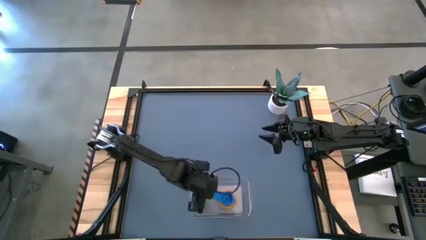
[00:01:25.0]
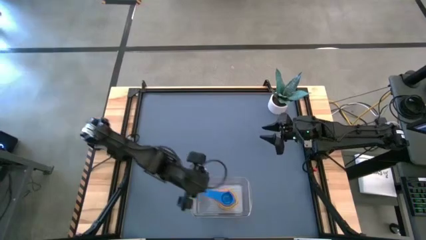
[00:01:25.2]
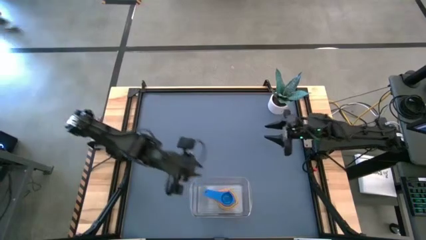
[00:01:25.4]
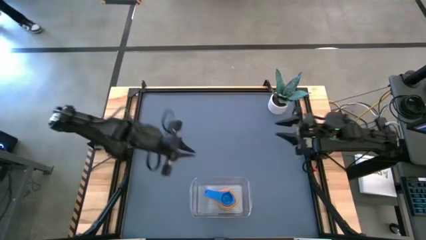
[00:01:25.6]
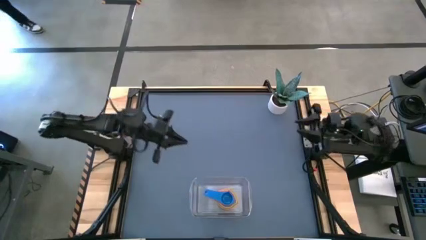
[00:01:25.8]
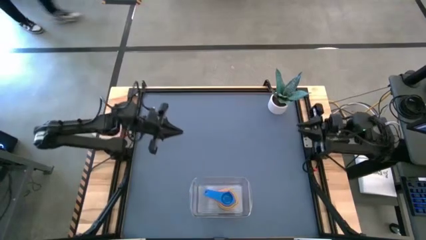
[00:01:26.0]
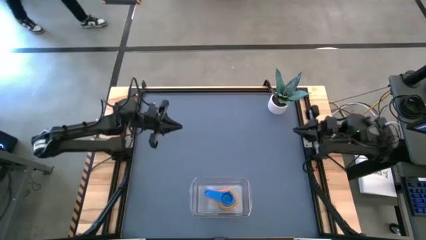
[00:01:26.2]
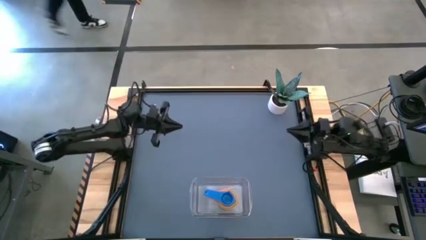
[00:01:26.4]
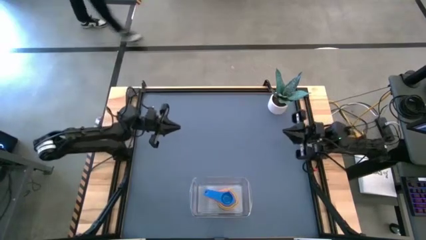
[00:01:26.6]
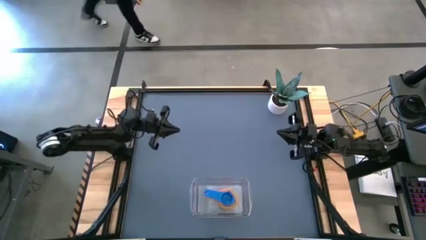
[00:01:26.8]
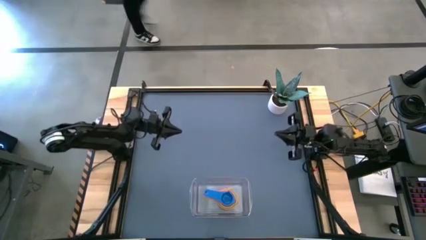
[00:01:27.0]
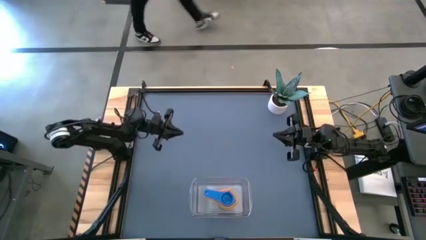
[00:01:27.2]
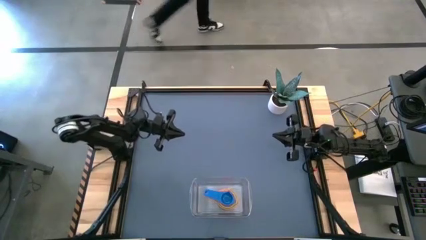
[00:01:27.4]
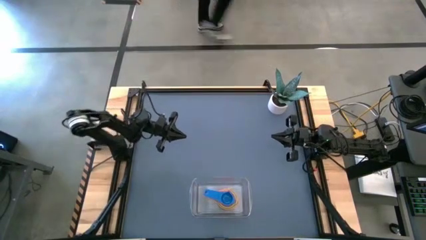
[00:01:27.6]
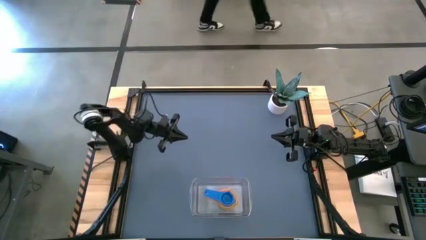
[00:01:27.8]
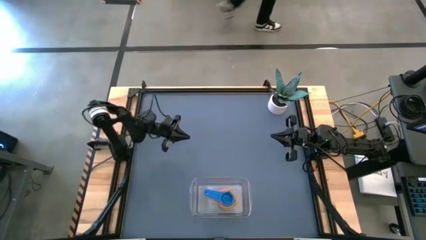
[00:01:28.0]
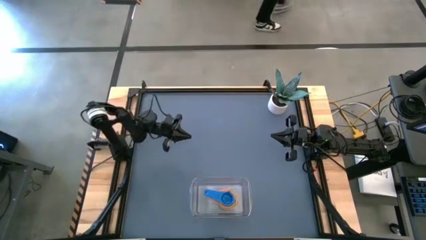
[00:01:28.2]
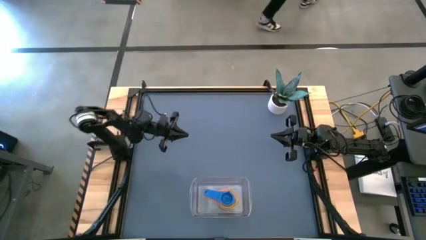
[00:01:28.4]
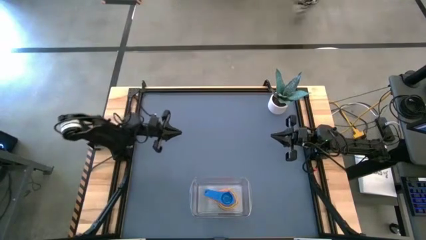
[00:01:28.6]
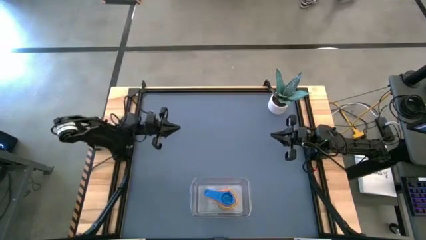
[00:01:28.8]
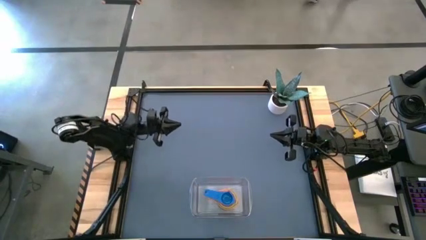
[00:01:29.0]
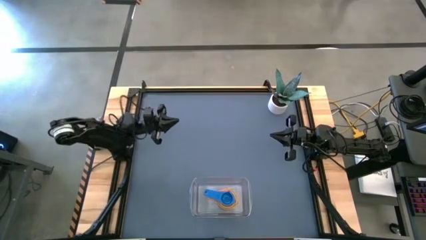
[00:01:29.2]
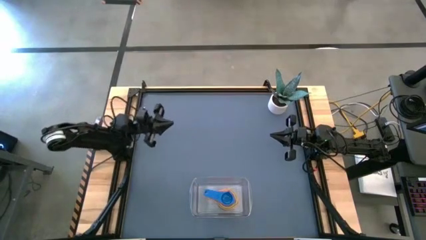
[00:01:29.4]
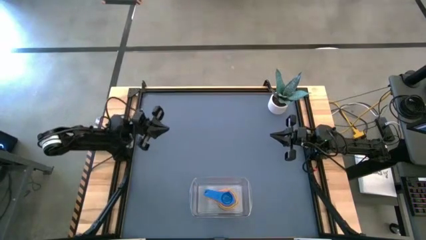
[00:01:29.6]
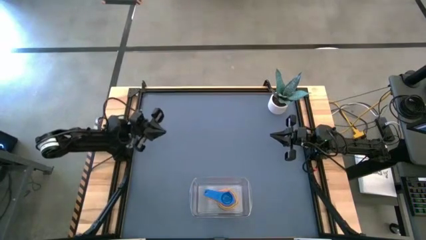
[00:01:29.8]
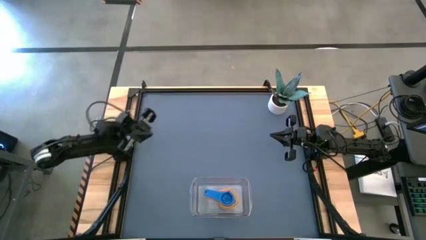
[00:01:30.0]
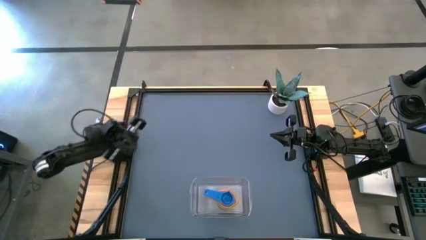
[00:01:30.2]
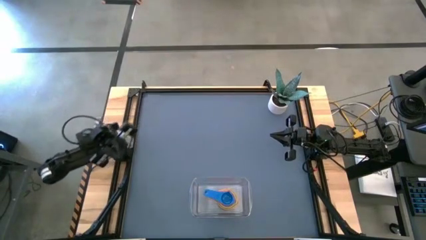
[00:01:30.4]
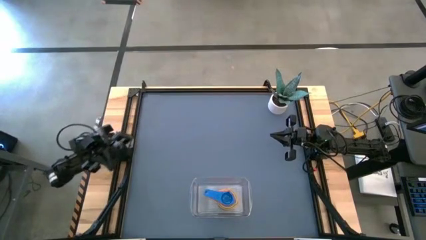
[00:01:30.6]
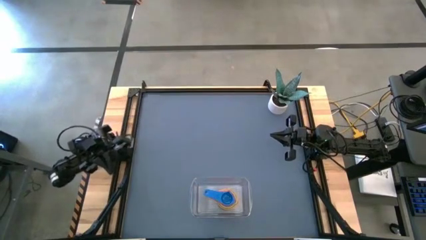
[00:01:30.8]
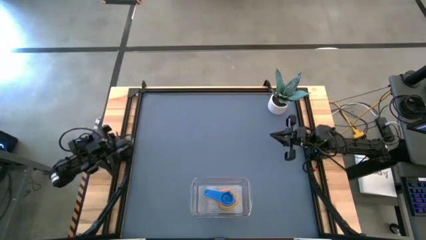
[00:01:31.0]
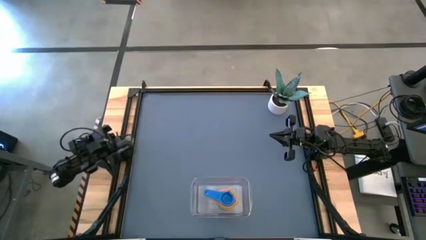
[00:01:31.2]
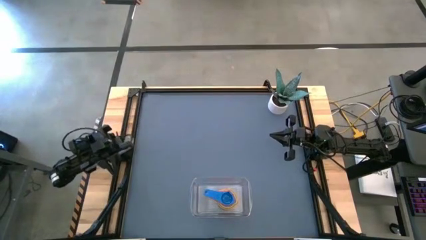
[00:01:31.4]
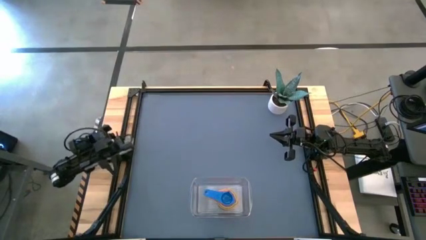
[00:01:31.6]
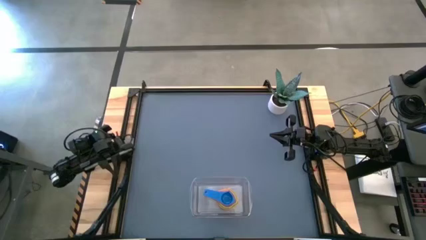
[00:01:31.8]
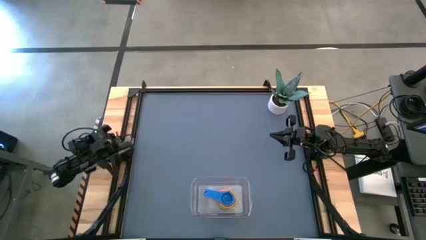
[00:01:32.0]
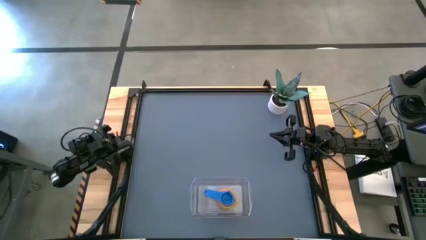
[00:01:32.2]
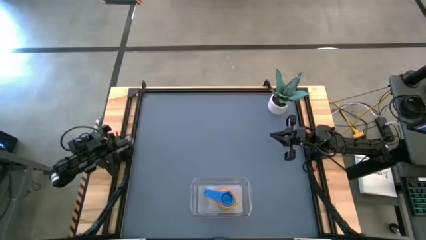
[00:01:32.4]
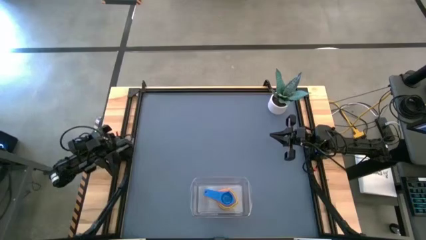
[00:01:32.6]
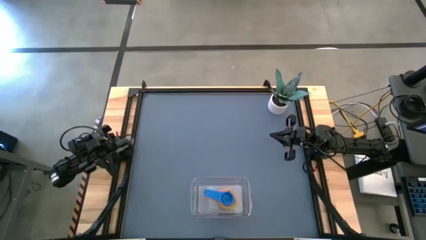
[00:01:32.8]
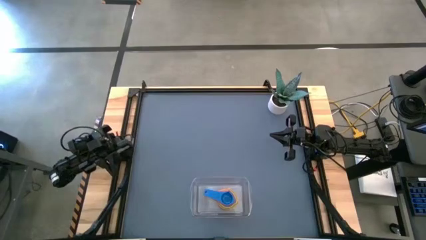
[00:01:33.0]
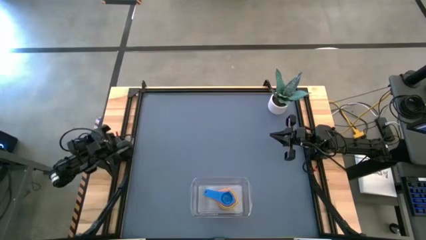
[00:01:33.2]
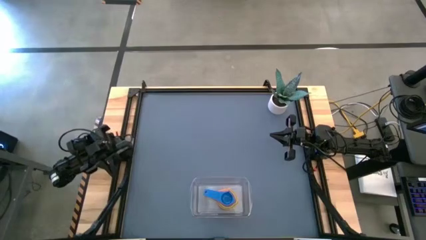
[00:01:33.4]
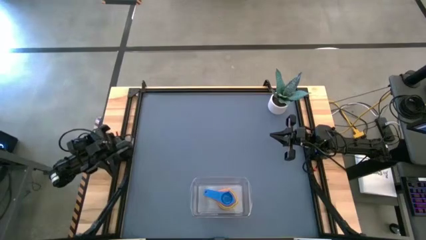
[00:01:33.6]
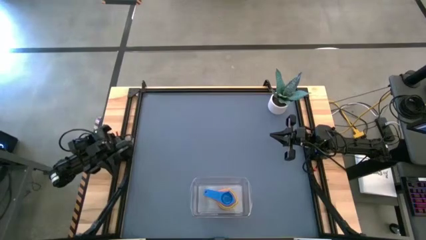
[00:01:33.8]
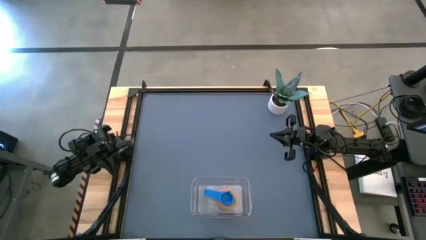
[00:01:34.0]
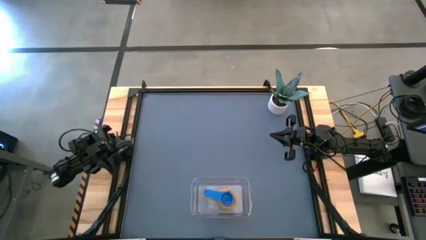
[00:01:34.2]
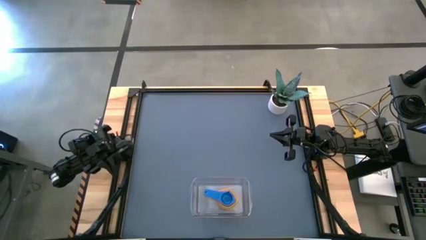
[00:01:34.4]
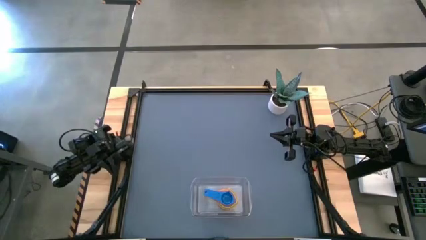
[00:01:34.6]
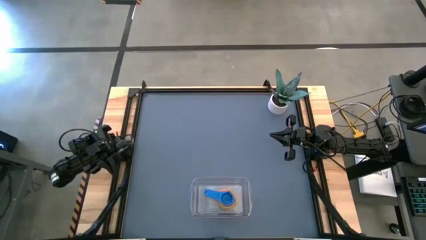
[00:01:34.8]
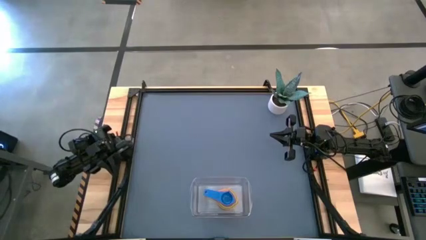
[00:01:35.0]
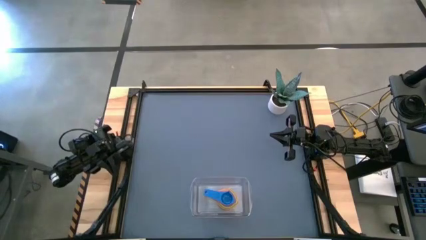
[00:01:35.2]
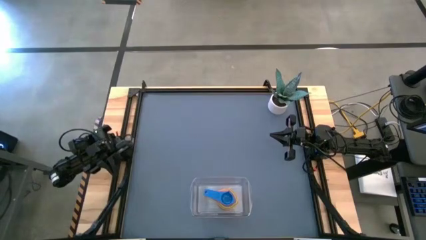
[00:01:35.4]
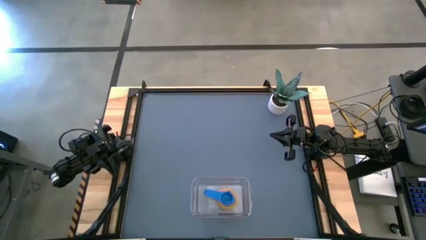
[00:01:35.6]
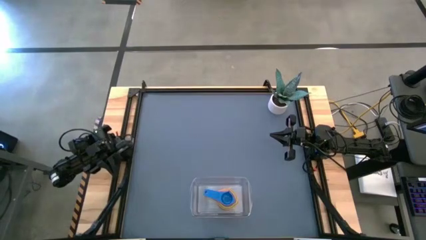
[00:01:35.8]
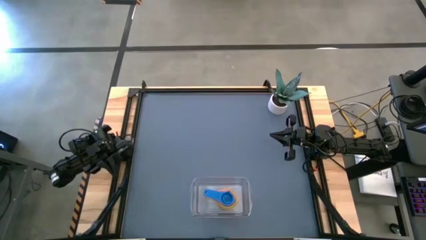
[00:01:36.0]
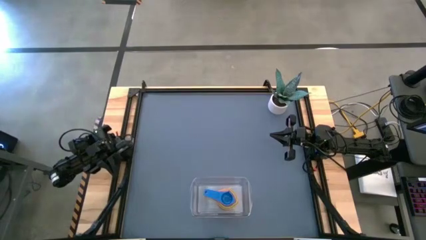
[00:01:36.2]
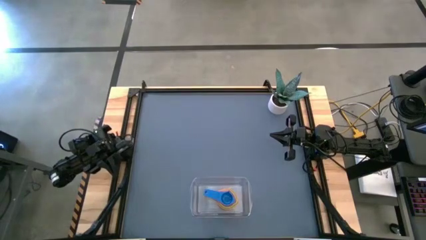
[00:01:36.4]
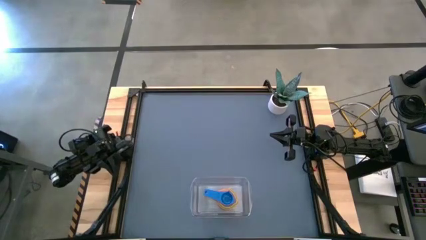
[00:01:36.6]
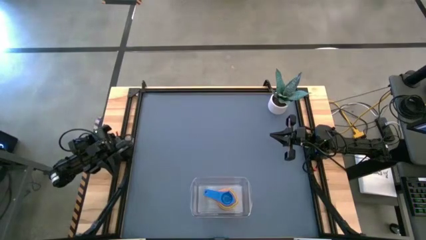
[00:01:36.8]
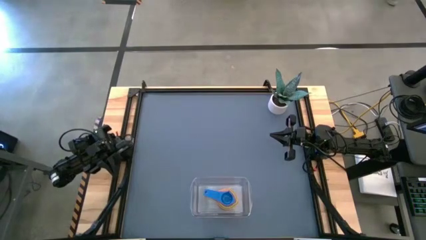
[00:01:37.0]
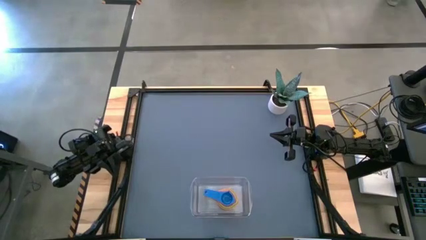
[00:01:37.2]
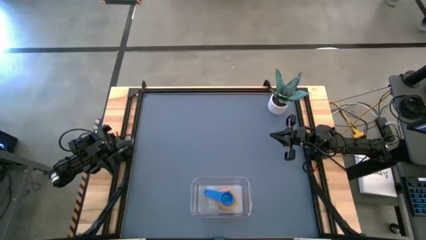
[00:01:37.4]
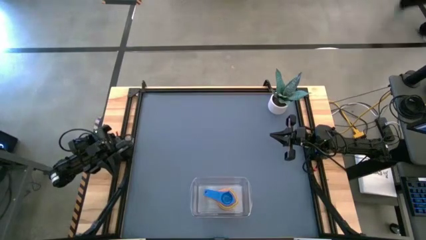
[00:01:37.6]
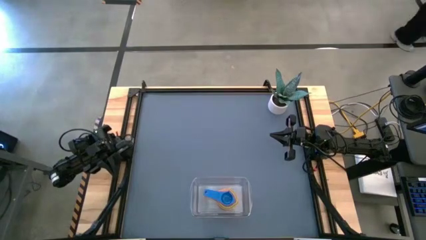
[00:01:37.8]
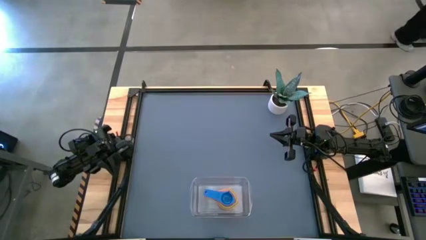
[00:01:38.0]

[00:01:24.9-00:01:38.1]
Task: Nest measuring cups in basket
Return to Home Position
